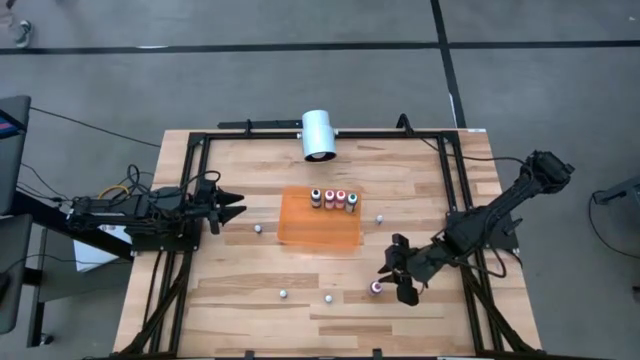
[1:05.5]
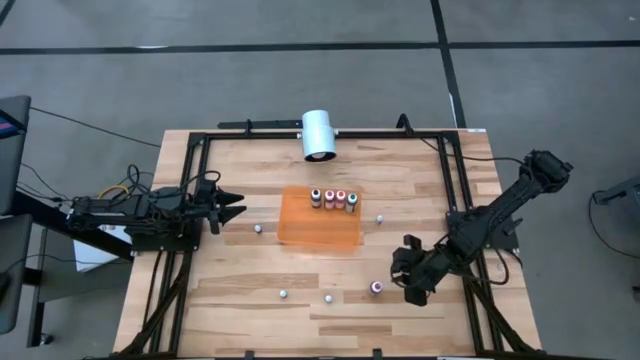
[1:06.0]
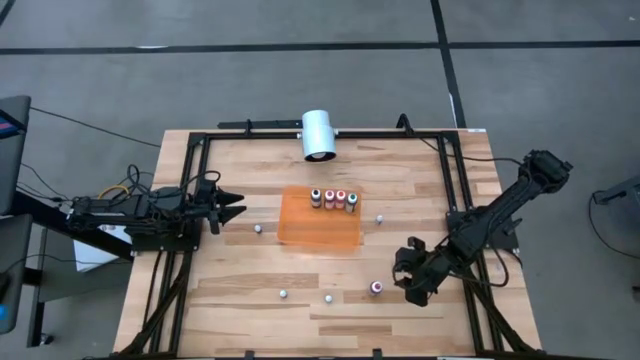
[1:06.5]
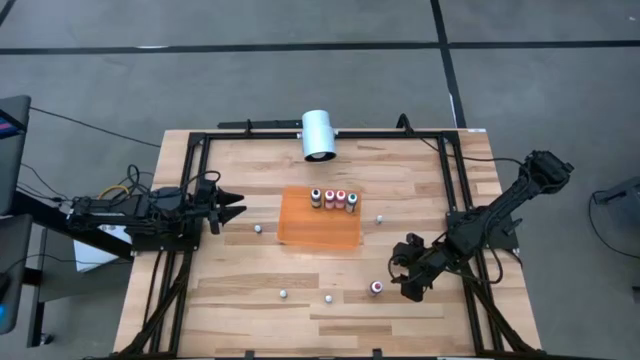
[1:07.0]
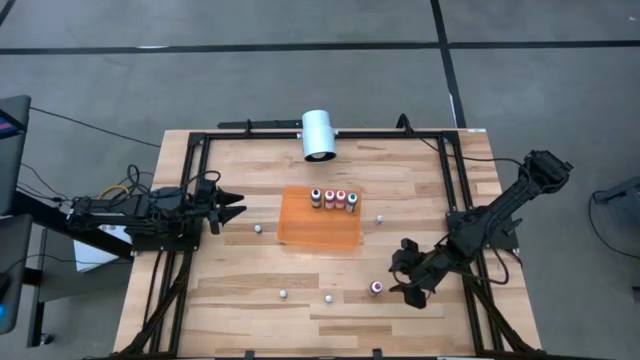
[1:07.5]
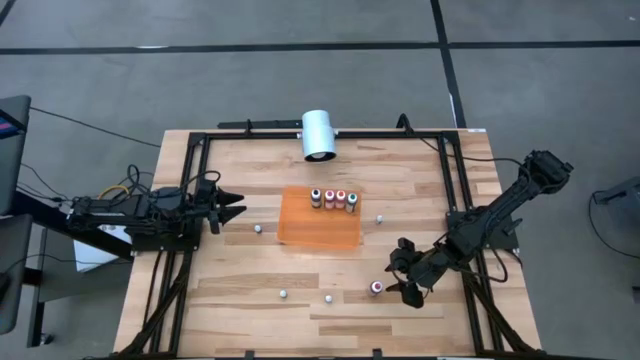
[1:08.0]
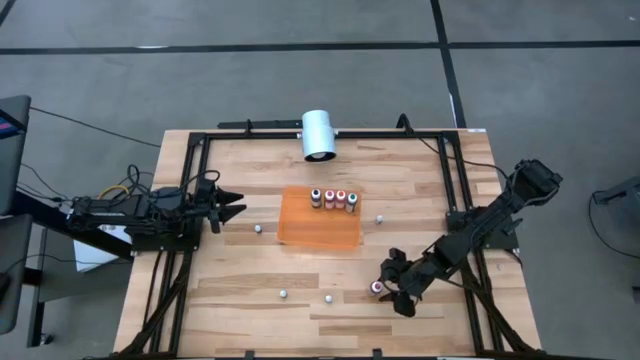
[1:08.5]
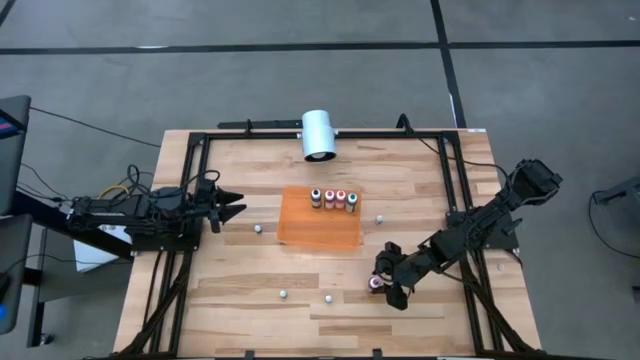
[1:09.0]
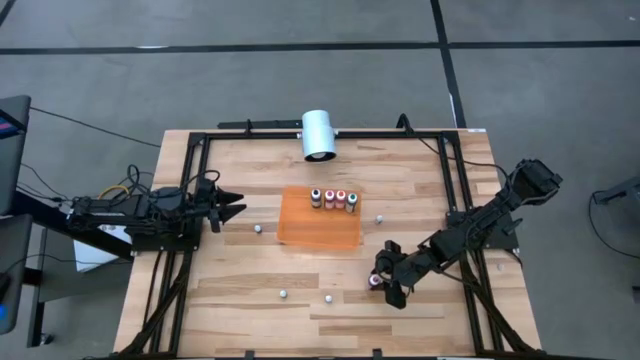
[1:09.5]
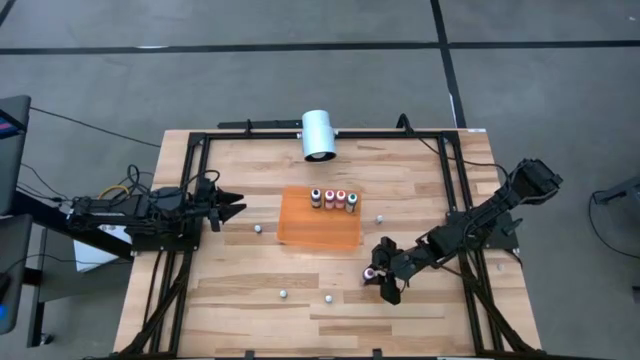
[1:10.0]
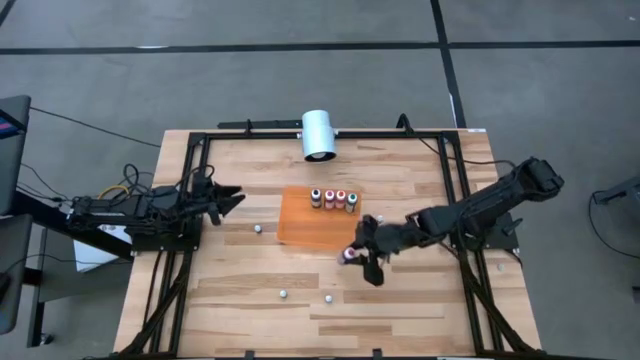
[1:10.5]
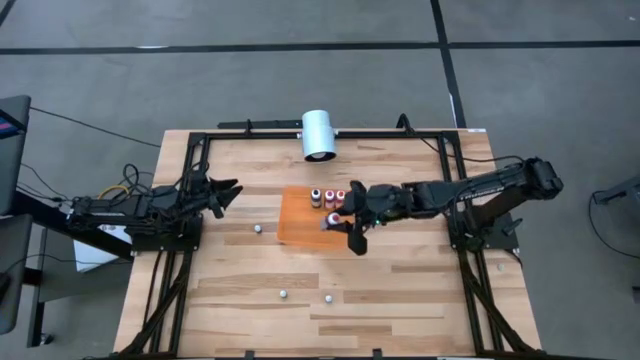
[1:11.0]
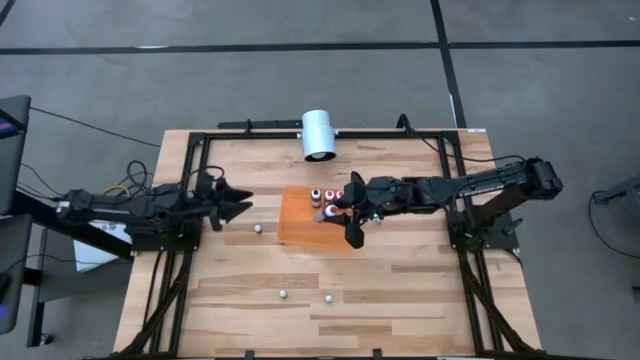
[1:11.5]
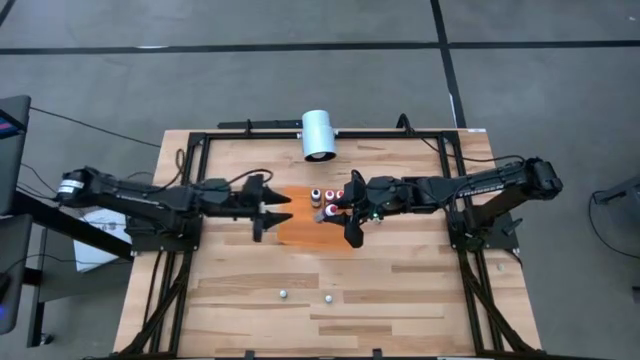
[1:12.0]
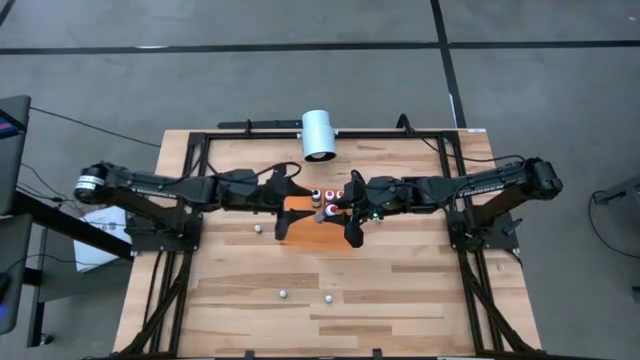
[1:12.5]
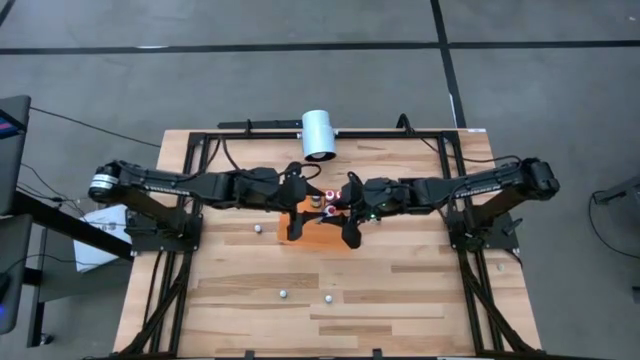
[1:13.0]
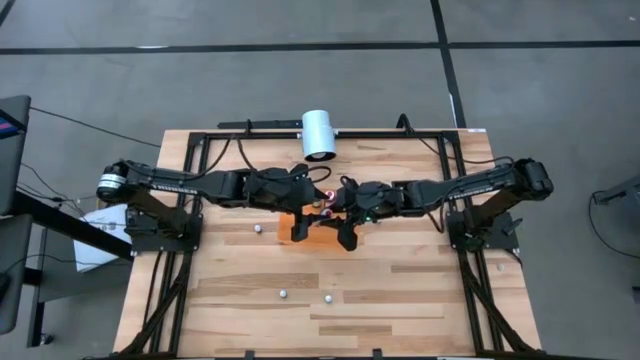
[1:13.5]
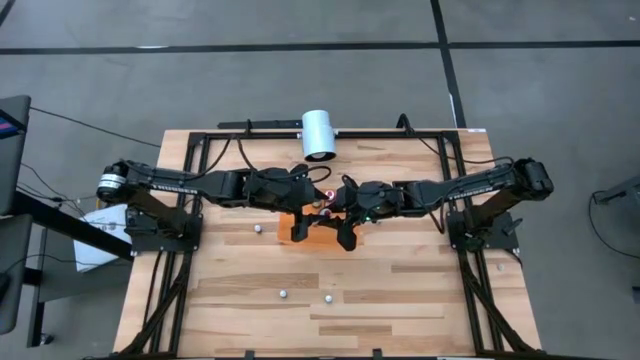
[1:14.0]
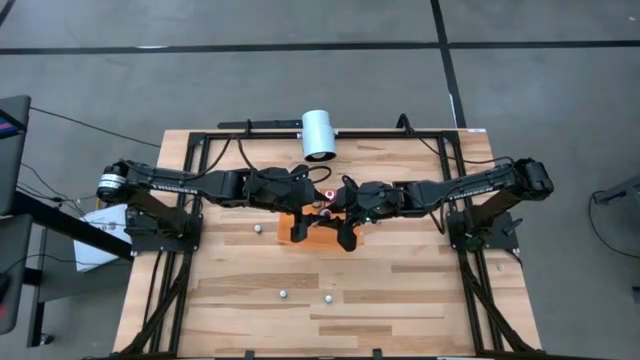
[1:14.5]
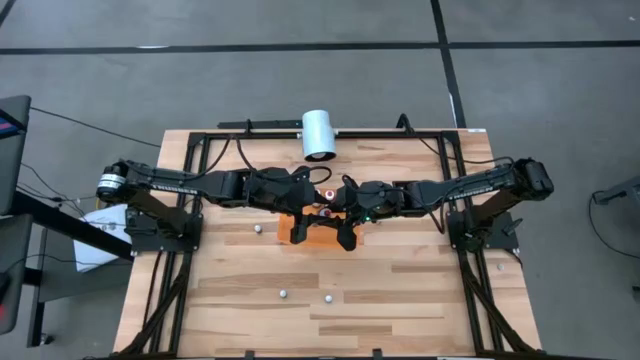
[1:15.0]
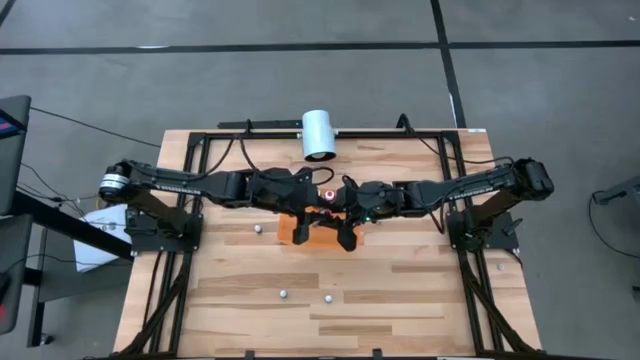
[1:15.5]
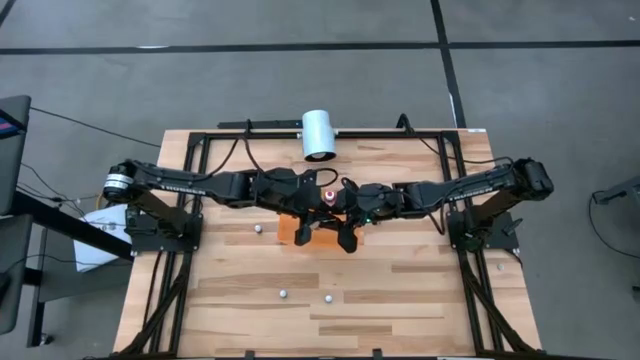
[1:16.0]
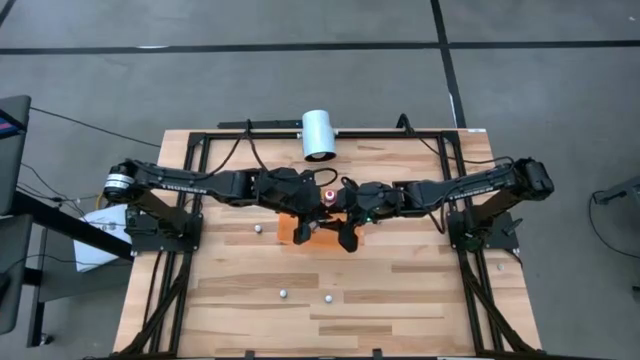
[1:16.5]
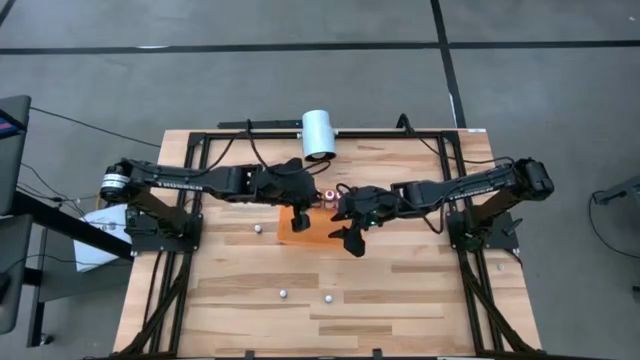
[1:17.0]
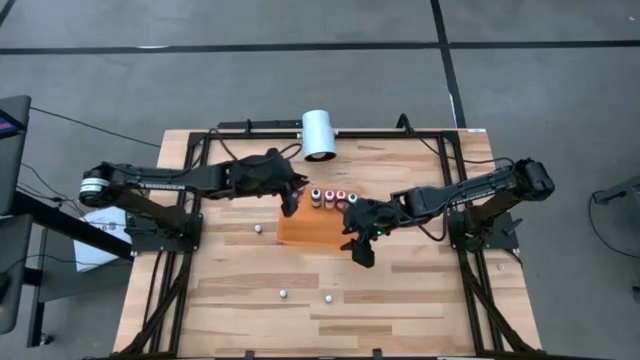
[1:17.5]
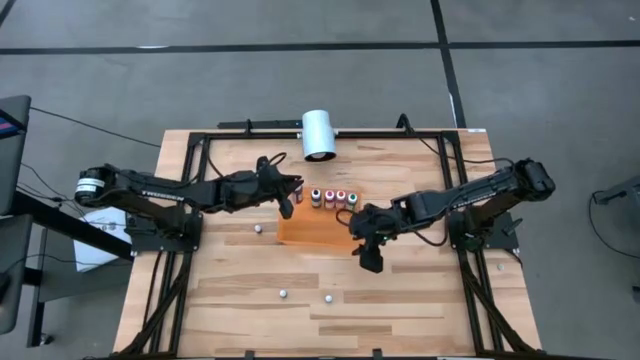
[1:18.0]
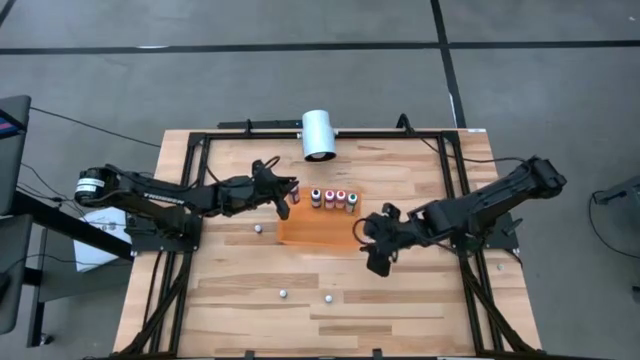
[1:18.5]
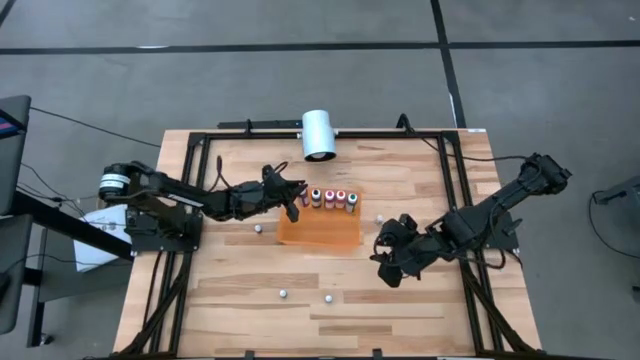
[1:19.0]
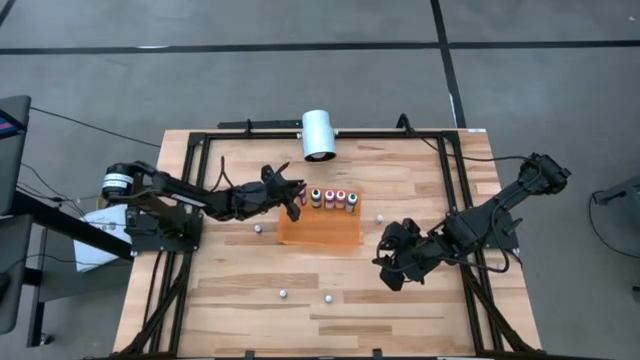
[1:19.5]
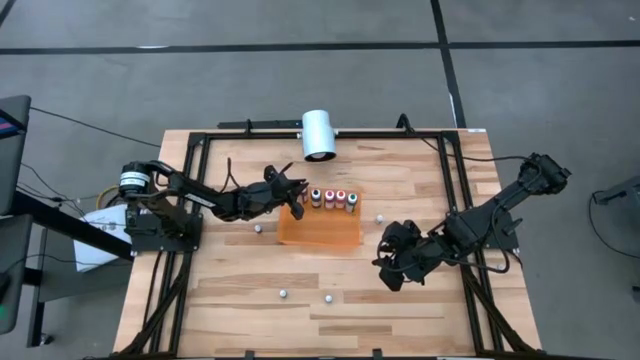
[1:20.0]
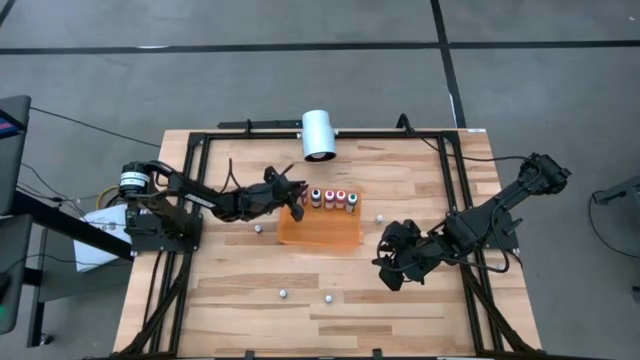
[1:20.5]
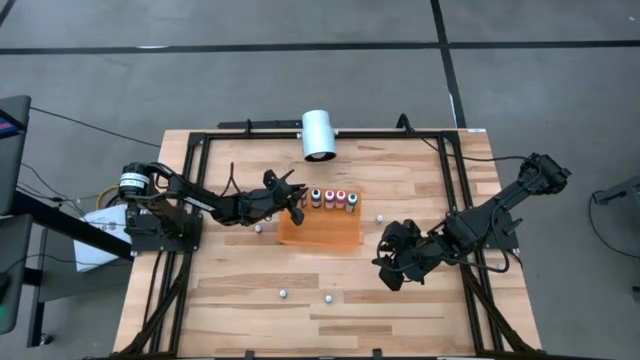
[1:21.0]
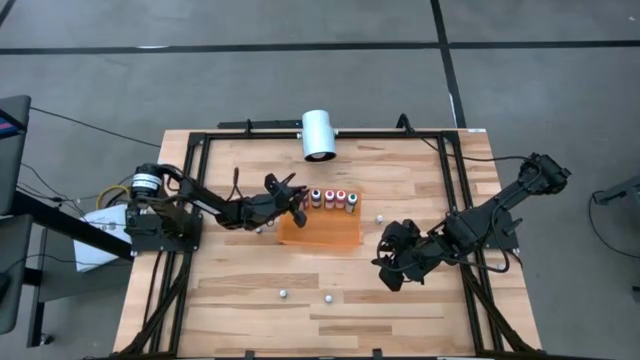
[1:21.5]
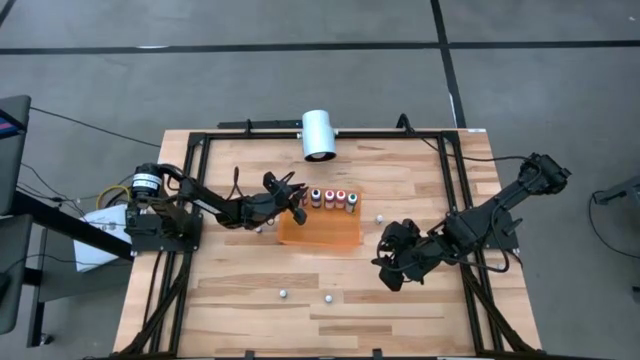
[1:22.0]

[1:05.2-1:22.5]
Task: Pick & Place food coloring
Put the large red food coloring bottle into the orange bin
